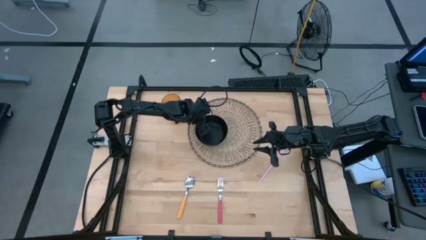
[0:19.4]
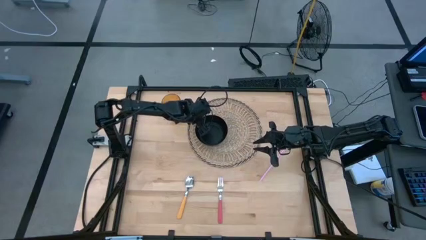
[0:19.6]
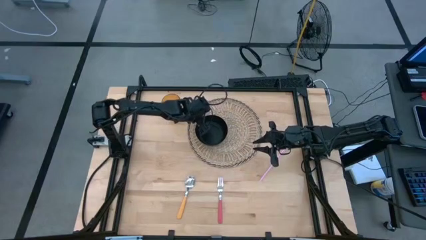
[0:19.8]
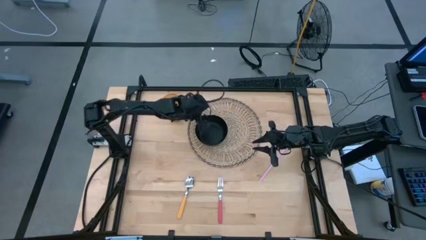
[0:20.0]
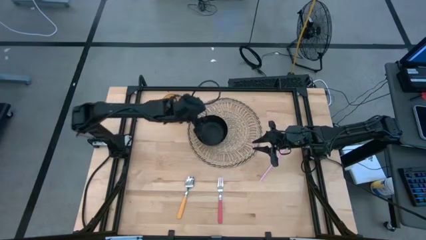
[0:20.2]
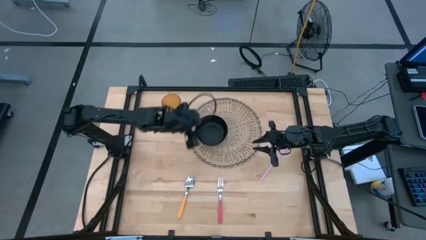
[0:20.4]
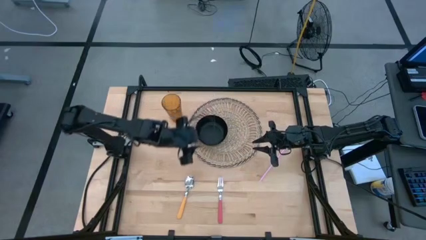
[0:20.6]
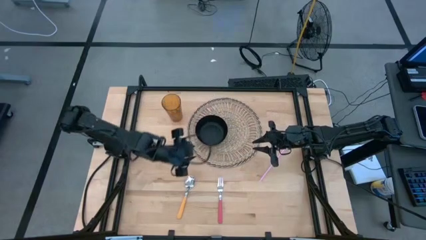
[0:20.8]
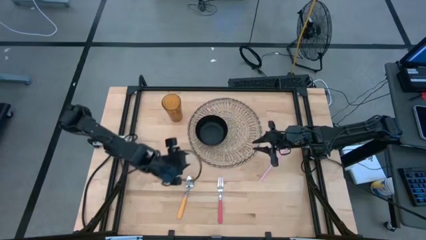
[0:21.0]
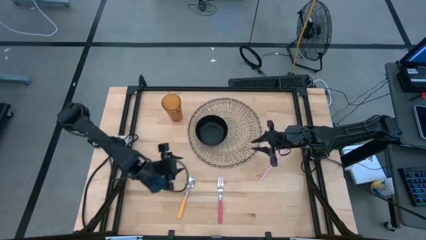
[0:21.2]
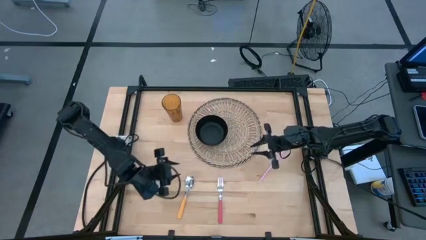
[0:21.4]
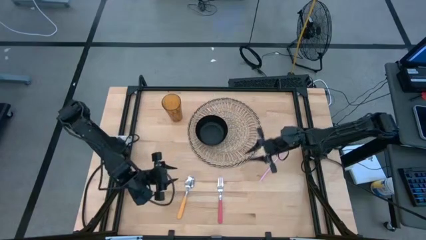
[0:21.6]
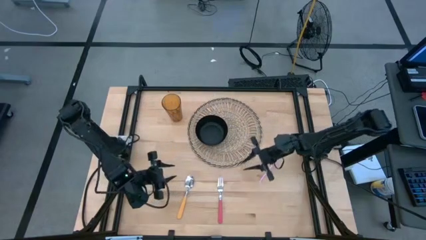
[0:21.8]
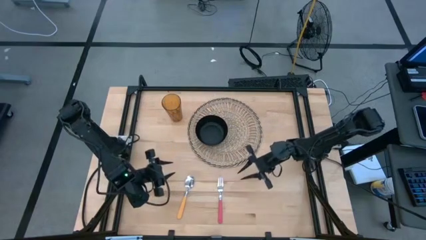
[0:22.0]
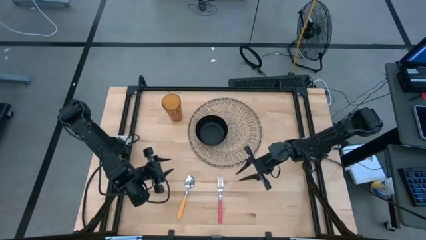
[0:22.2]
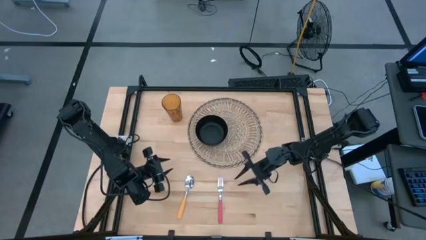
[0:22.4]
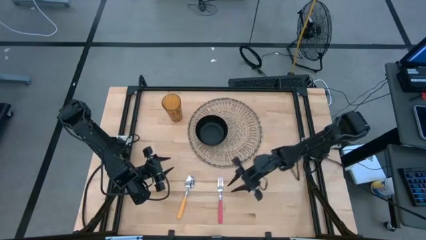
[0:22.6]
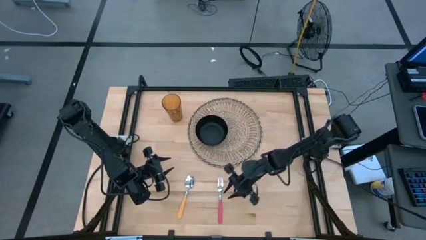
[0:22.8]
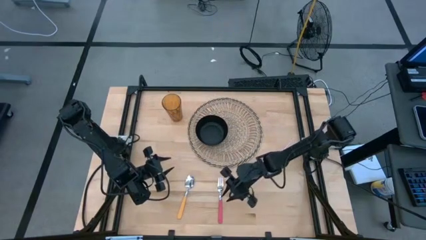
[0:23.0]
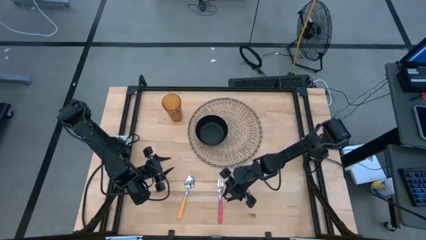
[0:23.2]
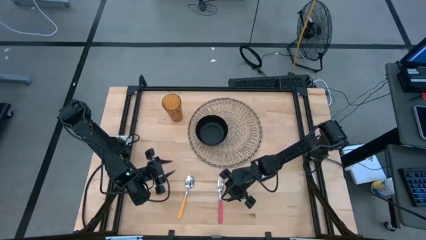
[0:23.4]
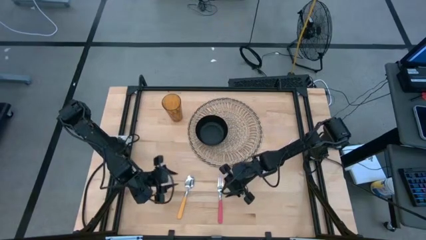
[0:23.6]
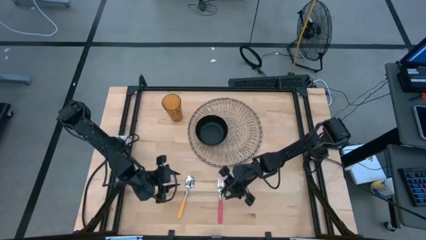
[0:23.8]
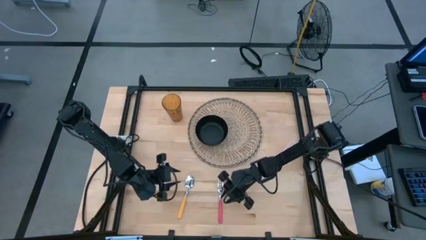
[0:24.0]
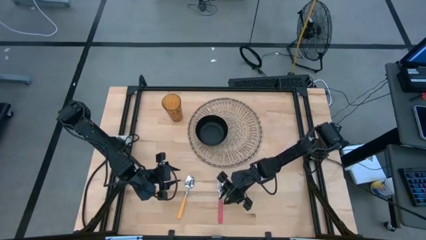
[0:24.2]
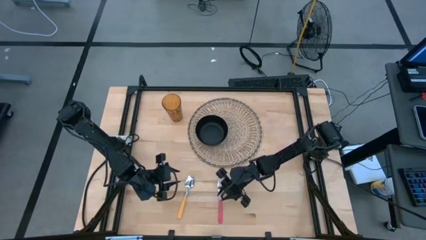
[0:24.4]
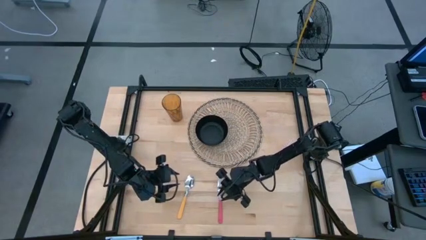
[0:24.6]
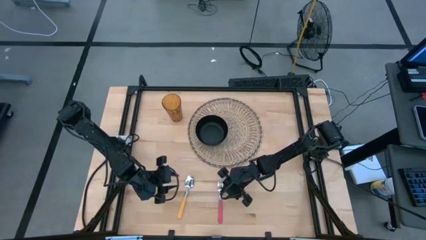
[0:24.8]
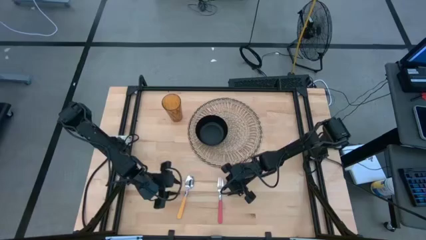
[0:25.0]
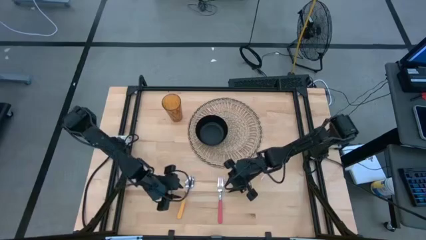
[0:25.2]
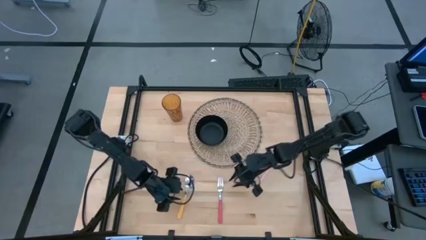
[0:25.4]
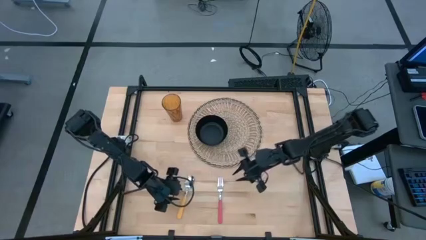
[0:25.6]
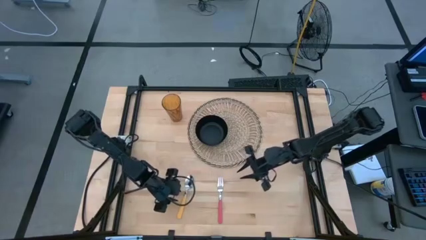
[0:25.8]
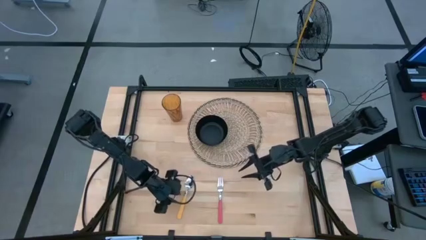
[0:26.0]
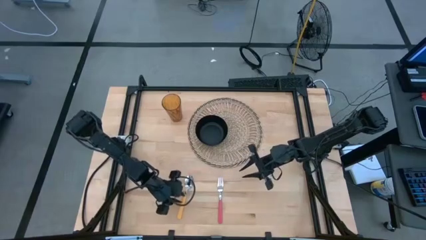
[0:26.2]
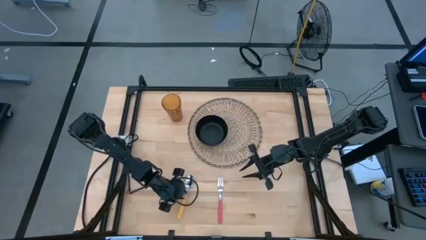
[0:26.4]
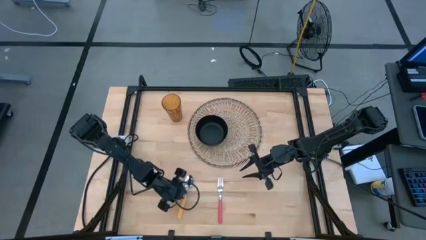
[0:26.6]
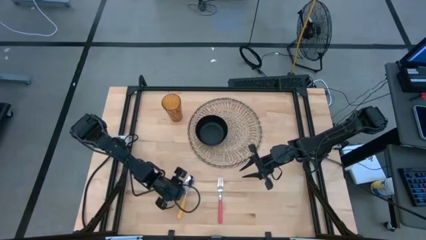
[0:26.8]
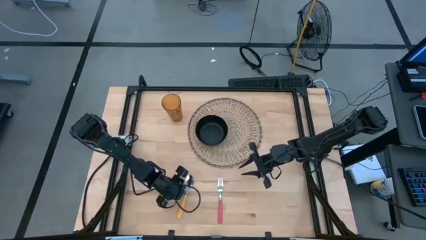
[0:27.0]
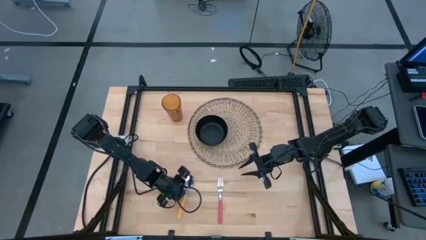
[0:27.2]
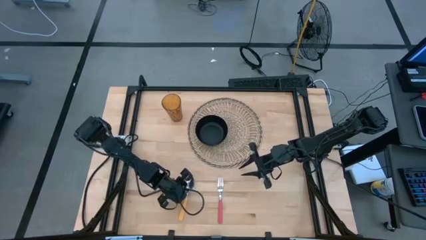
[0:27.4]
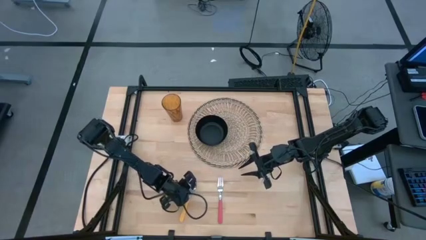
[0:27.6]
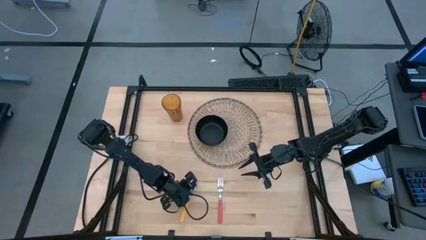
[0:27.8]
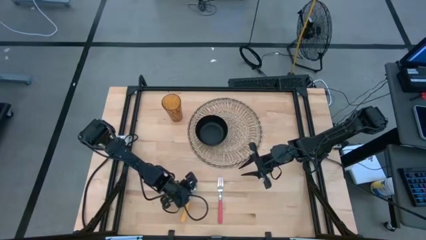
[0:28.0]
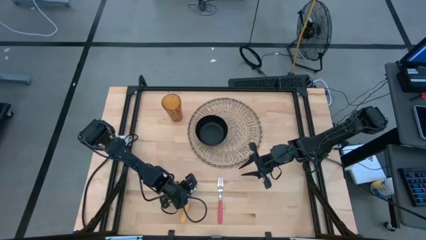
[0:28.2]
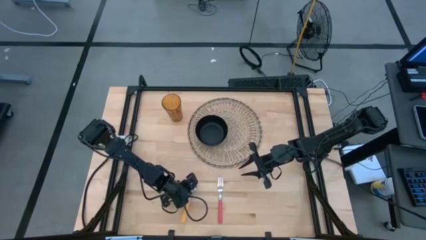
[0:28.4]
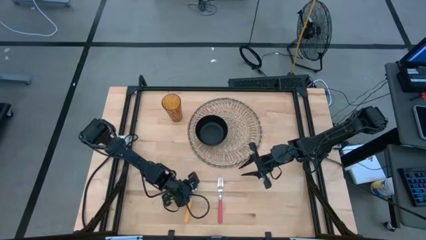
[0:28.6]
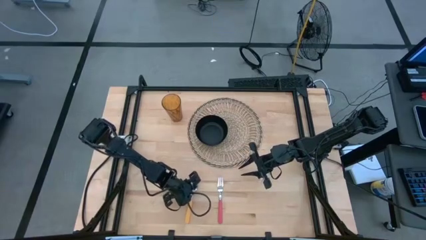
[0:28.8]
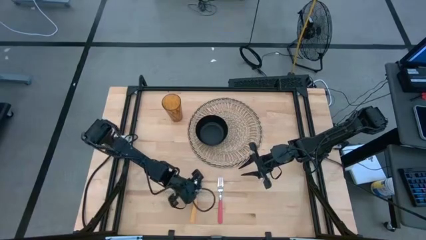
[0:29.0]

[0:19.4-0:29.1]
Task: Pick & Place Utensil
Put the yellow spoon into the black bowl on the brown mat

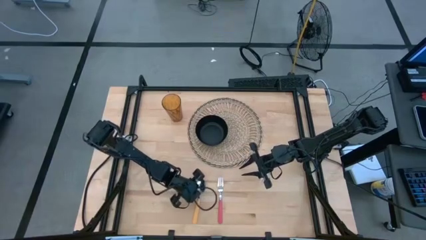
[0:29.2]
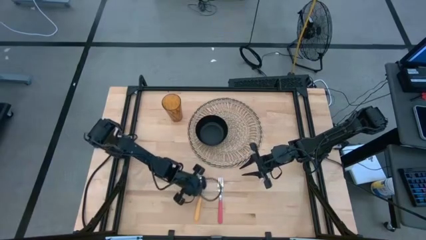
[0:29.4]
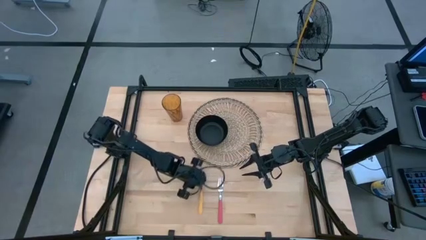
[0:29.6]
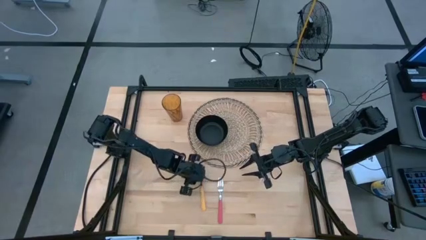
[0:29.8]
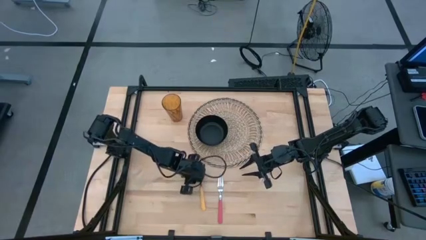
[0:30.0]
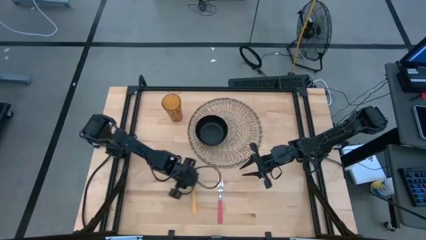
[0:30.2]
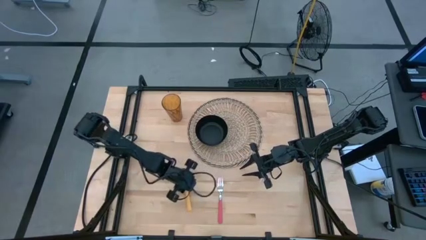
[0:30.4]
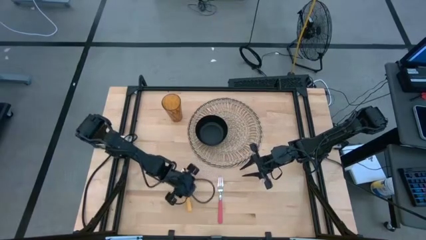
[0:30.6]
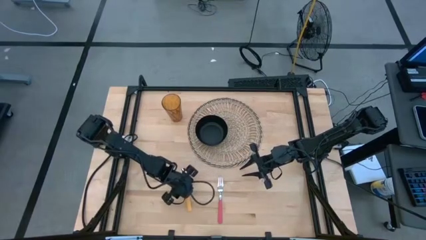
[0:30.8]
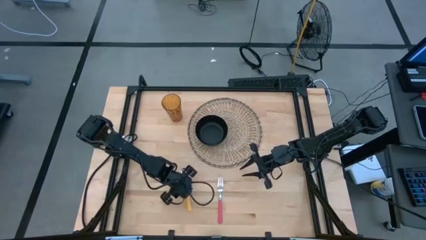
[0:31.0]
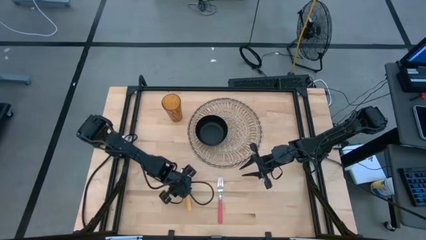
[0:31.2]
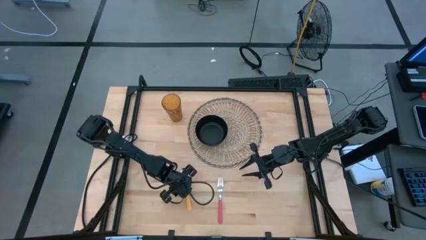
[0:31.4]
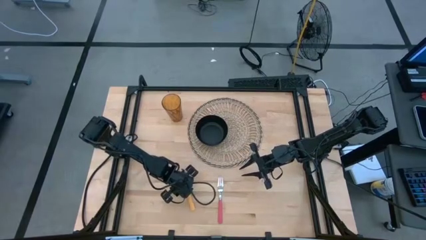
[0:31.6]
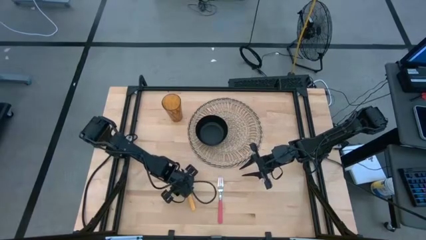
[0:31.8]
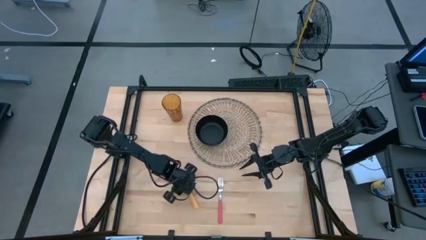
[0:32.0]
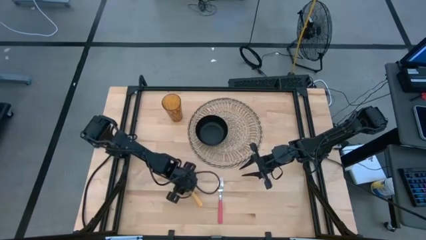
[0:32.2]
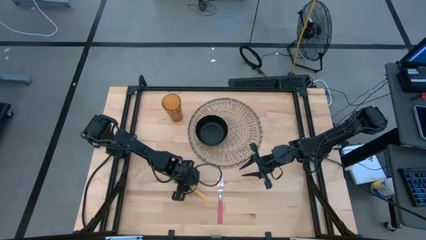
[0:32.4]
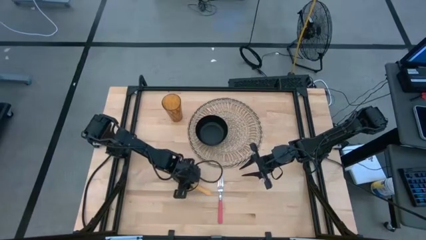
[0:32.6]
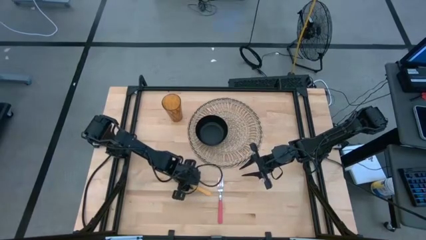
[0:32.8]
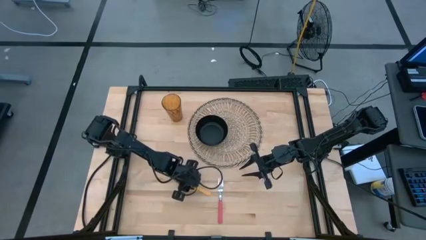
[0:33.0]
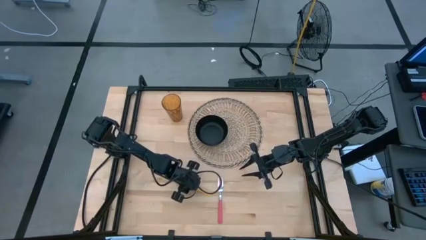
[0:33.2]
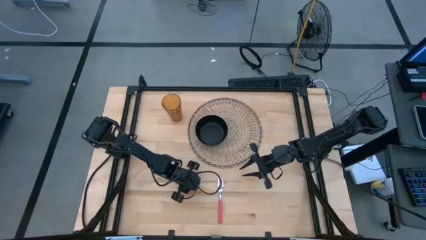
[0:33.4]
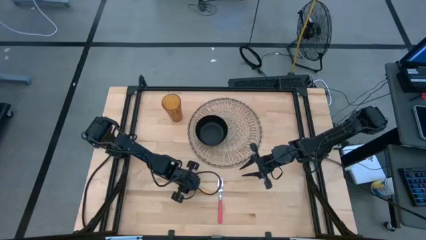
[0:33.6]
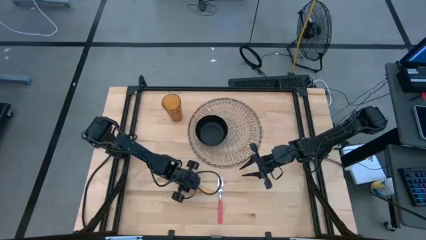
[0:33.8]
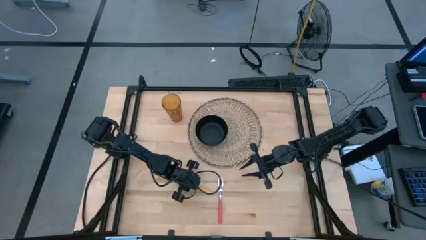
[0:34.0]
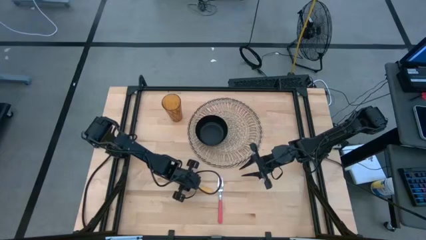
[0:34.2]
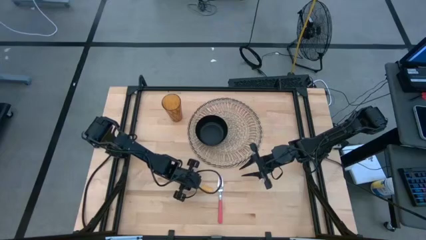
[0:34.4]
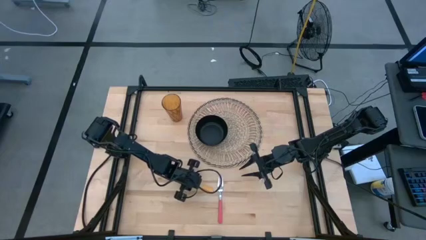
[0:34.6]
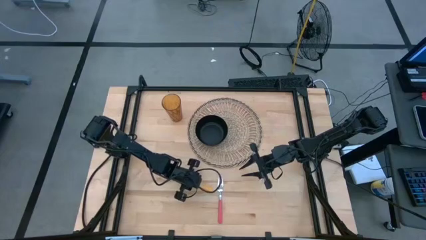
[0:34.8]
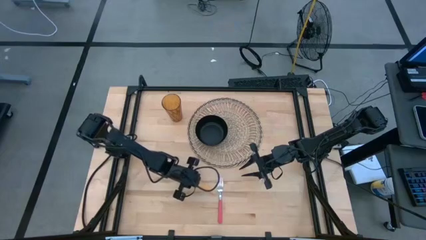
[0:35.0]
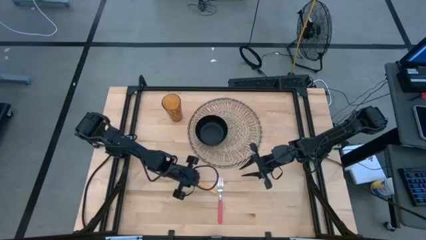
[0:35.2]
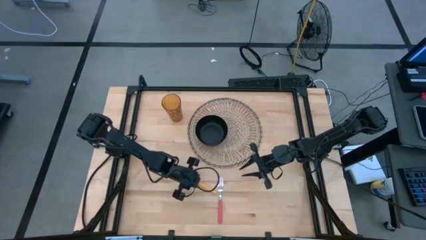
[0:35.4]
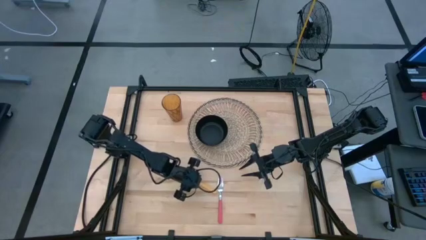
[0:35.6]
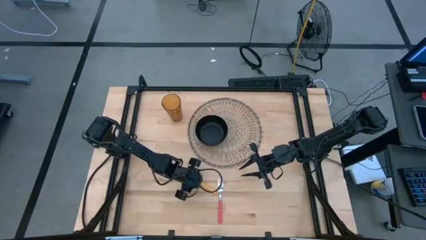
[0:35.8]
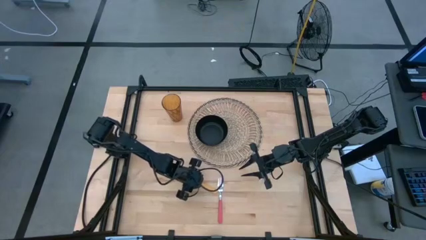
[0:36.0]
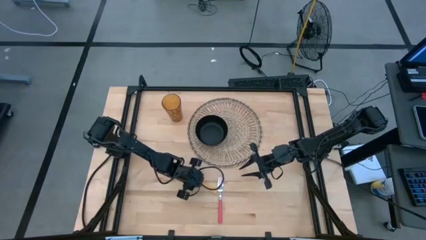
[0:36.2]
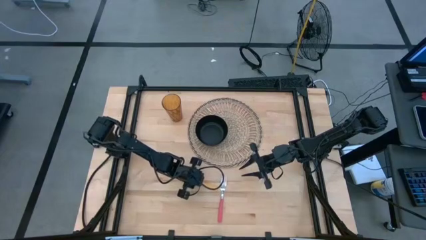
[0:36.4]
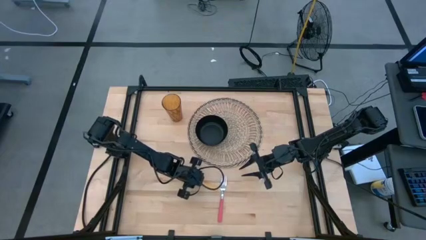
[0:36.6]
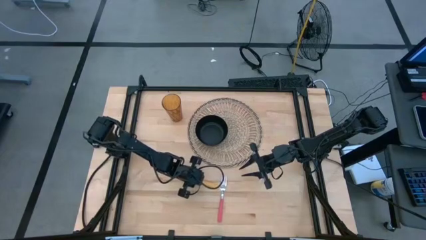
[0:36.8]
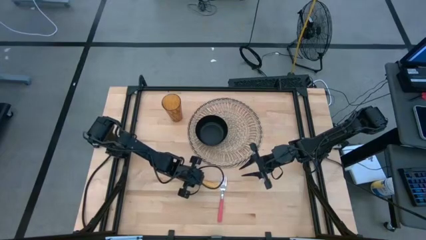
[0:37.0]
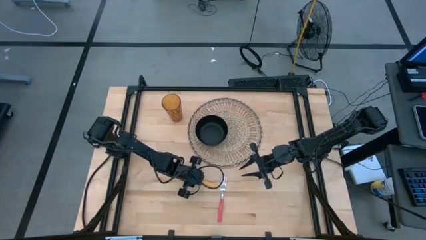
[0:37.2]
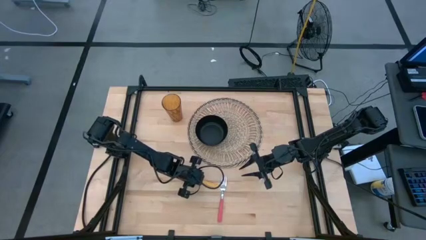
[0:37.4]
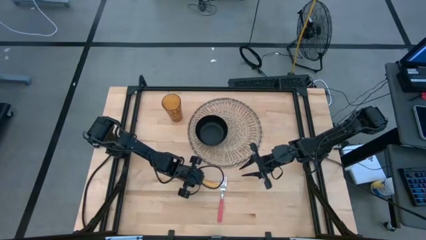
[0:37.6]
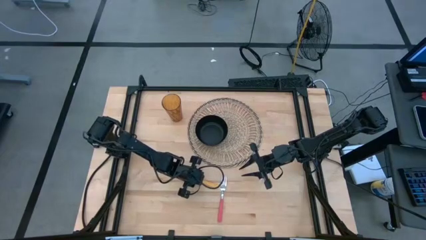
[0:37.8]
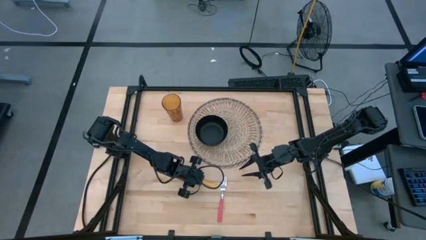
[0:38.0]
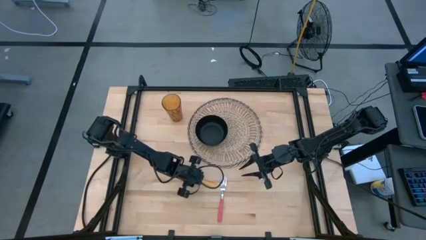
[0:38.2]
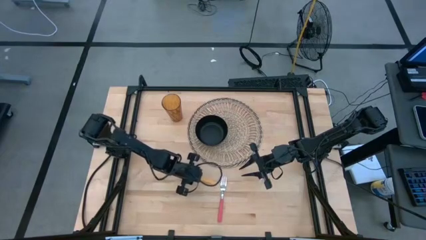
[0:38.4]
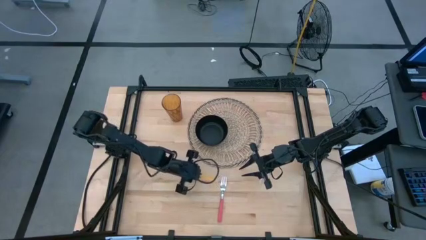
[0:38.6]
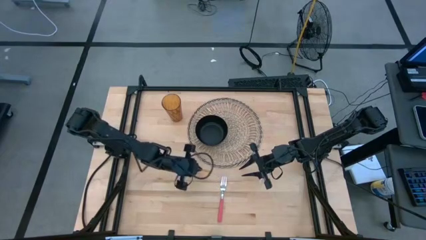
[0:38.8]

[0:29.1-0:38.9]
Put the yellow spoon into the black bowl on the brown mat
